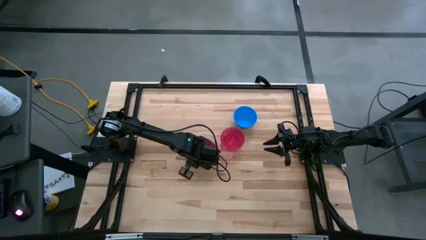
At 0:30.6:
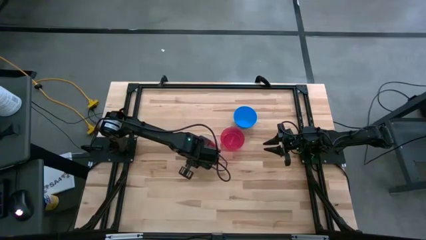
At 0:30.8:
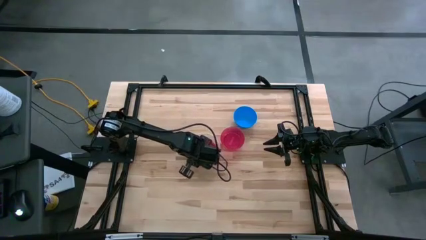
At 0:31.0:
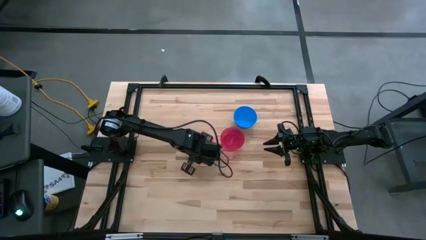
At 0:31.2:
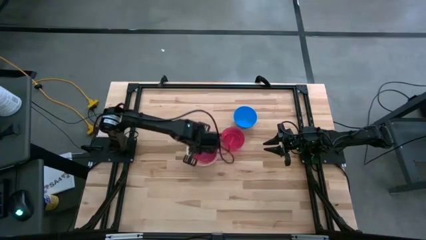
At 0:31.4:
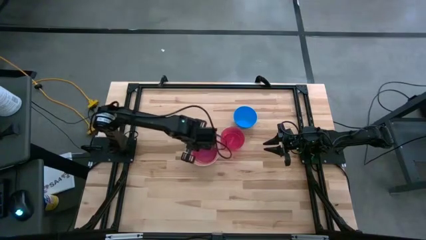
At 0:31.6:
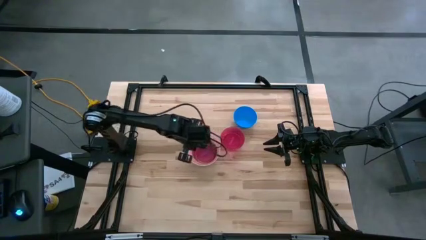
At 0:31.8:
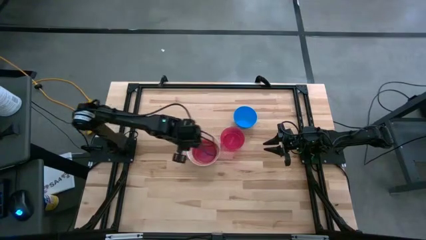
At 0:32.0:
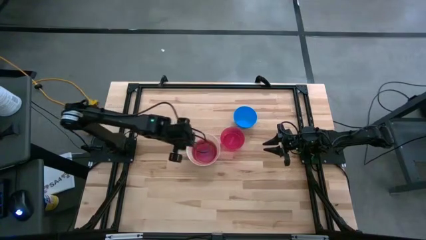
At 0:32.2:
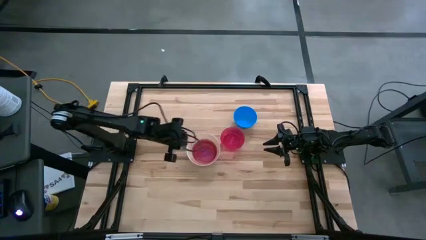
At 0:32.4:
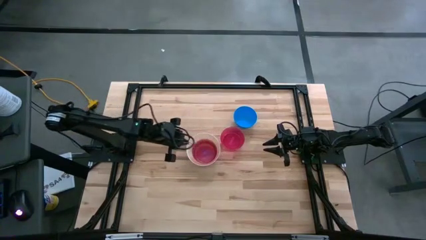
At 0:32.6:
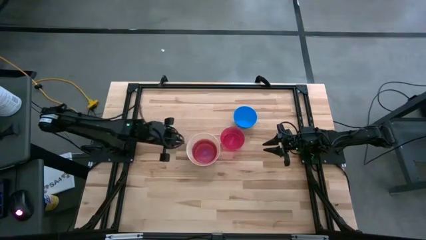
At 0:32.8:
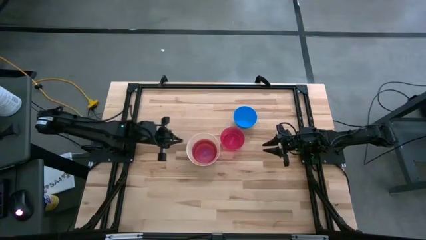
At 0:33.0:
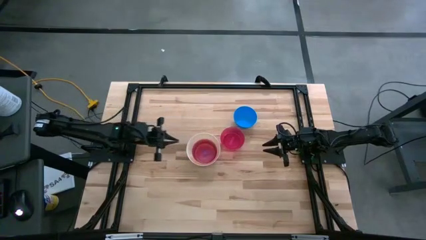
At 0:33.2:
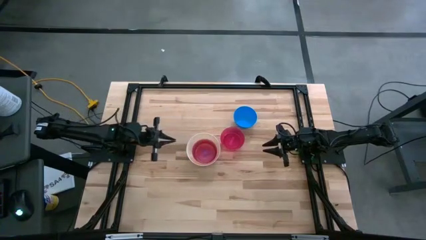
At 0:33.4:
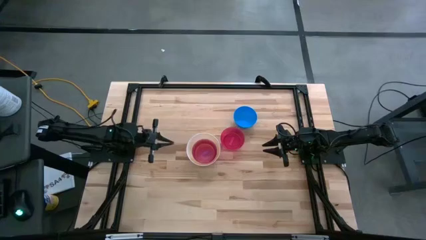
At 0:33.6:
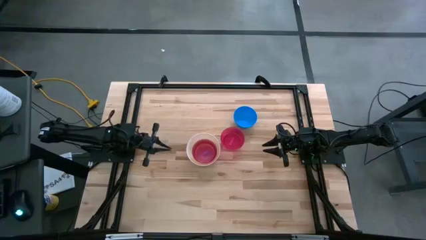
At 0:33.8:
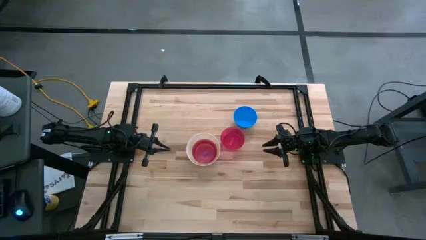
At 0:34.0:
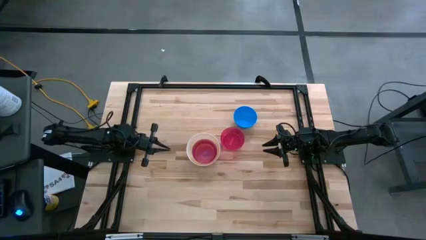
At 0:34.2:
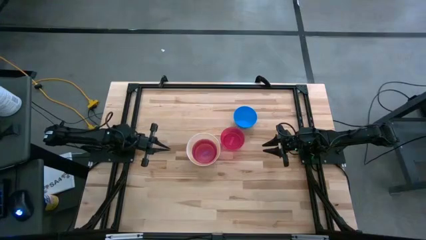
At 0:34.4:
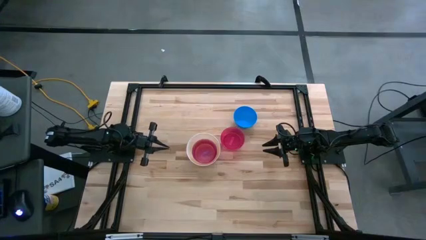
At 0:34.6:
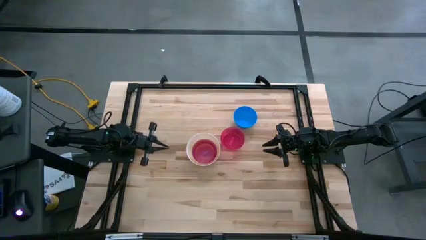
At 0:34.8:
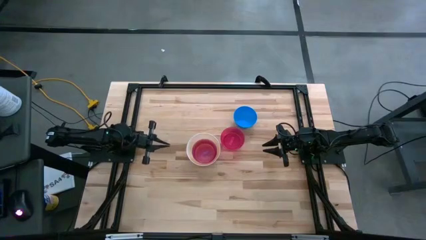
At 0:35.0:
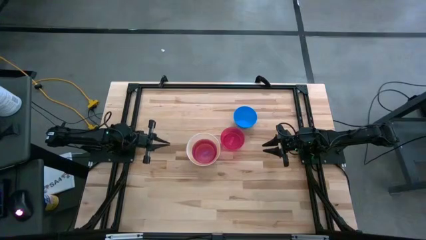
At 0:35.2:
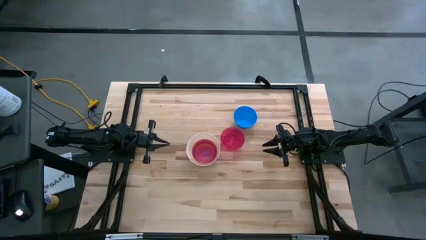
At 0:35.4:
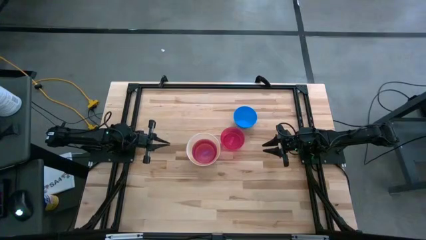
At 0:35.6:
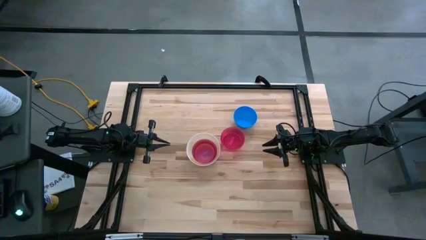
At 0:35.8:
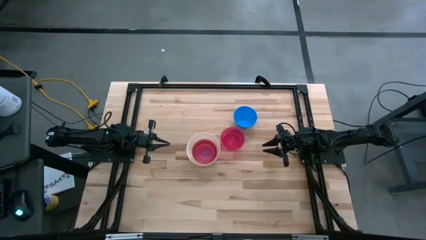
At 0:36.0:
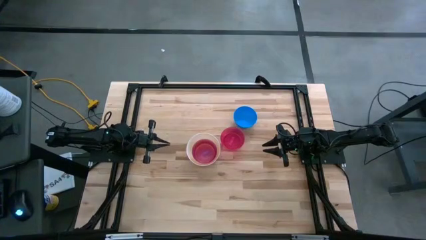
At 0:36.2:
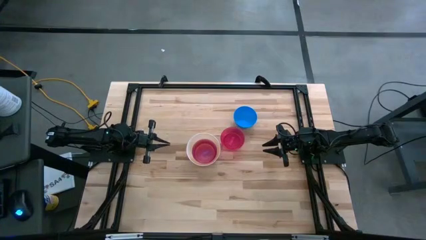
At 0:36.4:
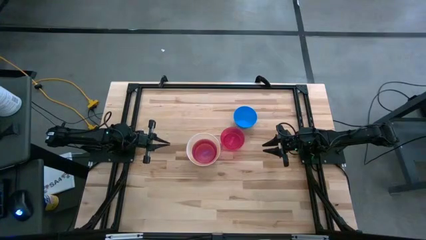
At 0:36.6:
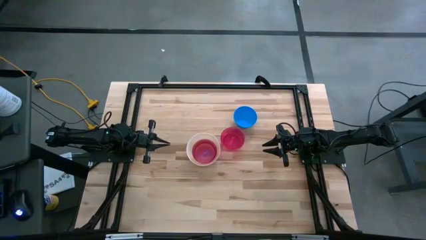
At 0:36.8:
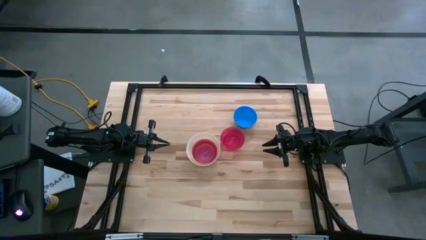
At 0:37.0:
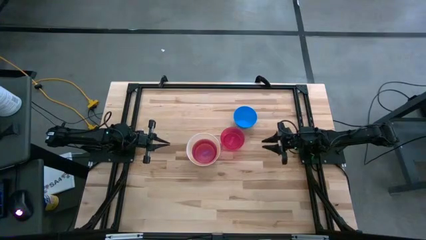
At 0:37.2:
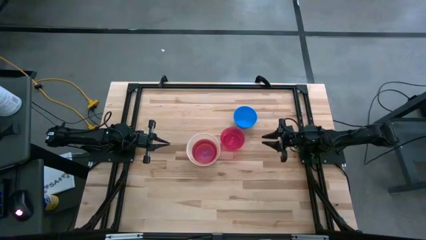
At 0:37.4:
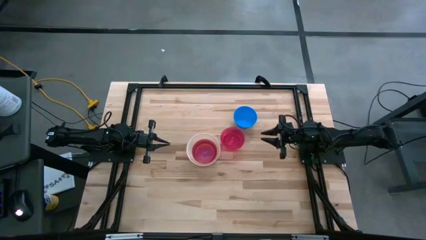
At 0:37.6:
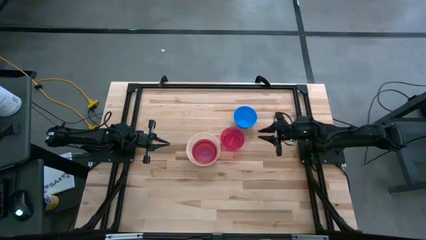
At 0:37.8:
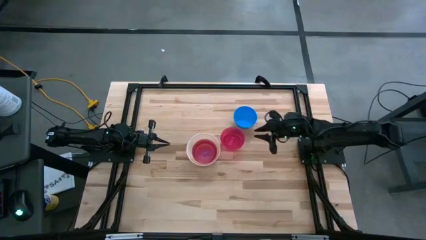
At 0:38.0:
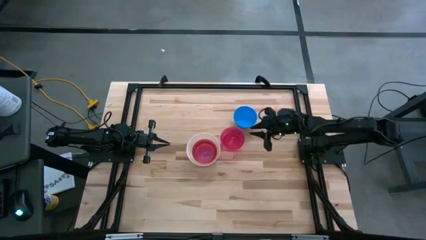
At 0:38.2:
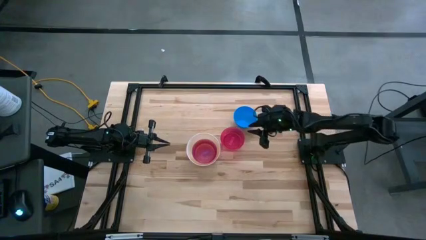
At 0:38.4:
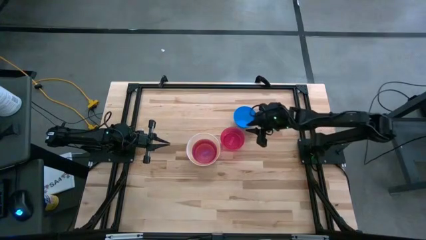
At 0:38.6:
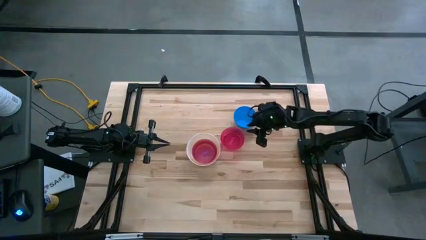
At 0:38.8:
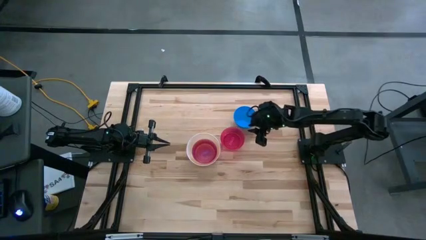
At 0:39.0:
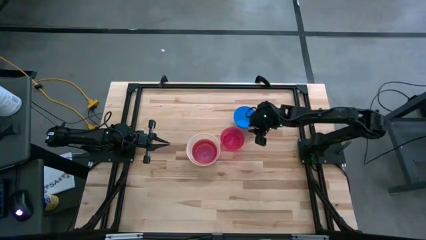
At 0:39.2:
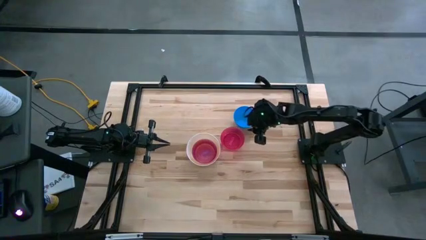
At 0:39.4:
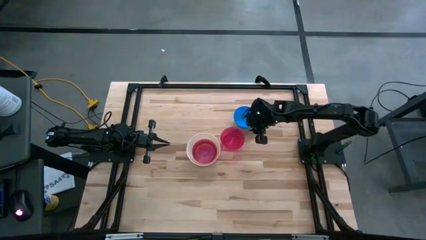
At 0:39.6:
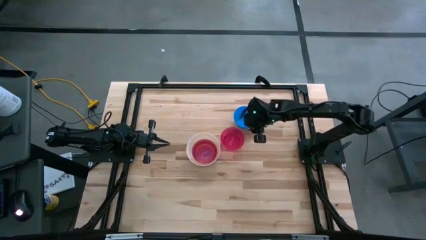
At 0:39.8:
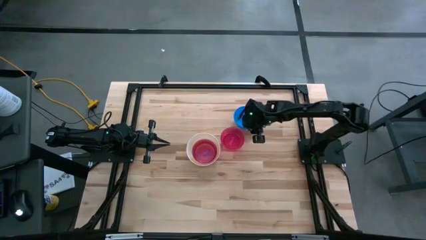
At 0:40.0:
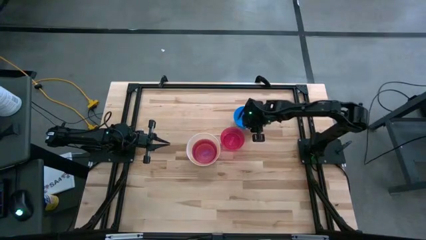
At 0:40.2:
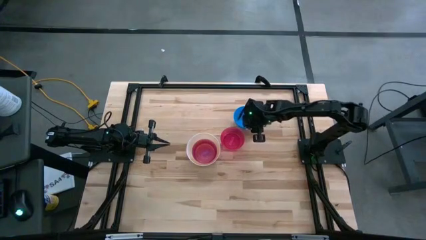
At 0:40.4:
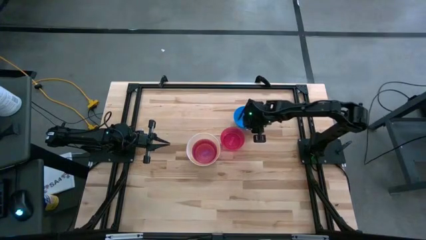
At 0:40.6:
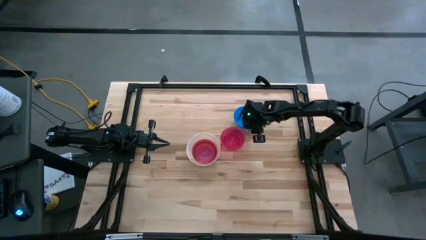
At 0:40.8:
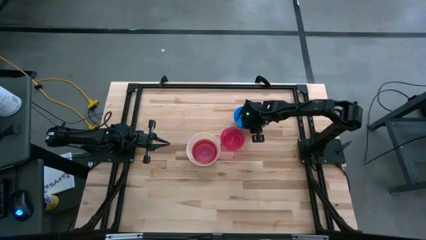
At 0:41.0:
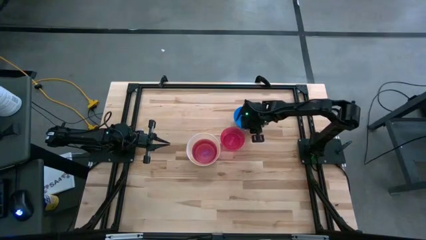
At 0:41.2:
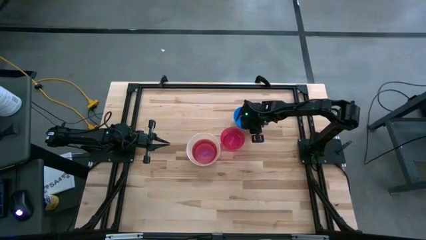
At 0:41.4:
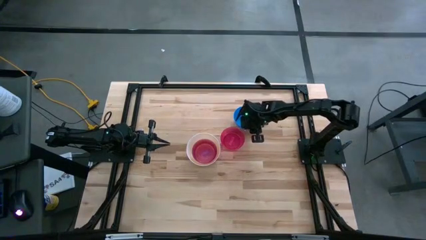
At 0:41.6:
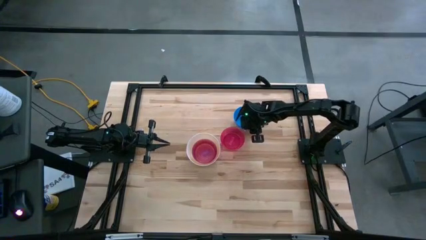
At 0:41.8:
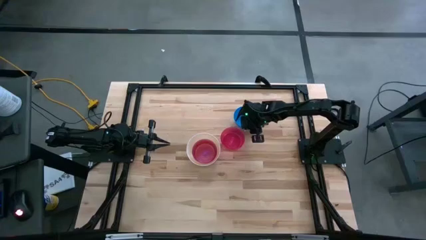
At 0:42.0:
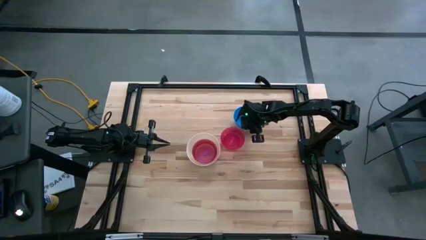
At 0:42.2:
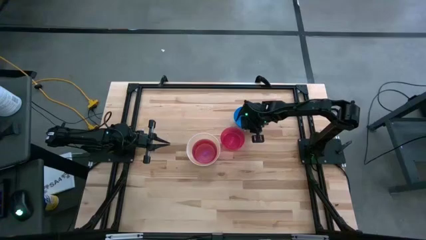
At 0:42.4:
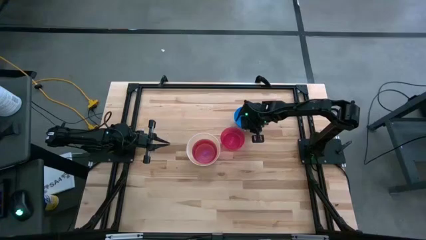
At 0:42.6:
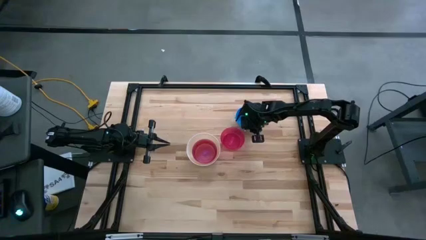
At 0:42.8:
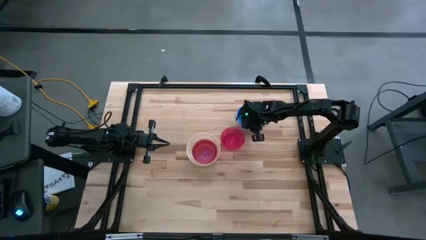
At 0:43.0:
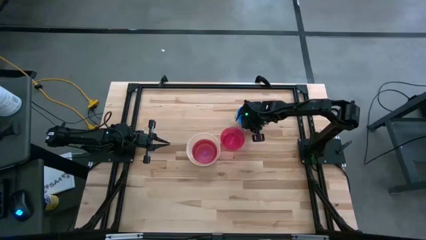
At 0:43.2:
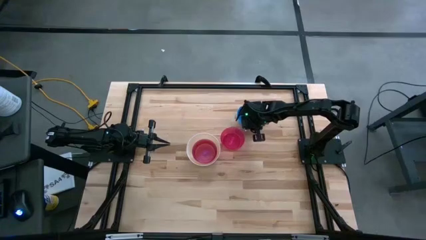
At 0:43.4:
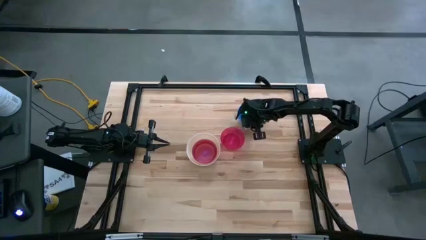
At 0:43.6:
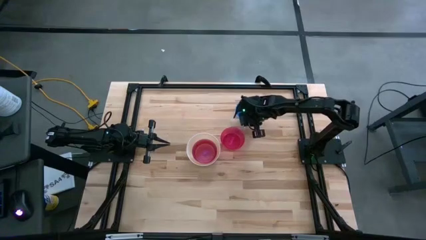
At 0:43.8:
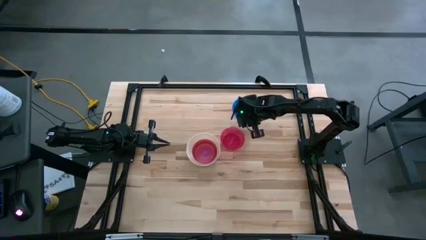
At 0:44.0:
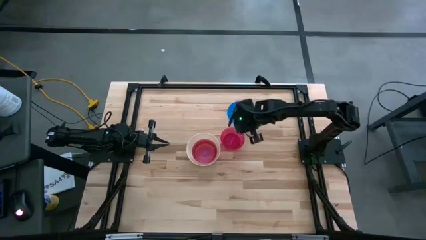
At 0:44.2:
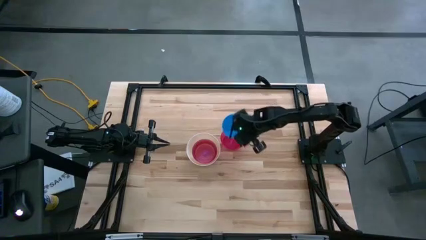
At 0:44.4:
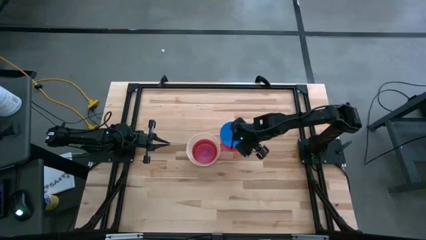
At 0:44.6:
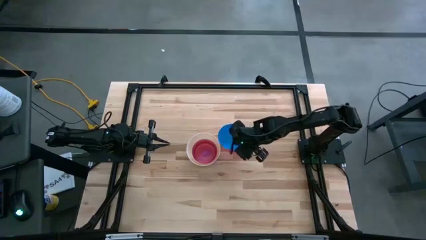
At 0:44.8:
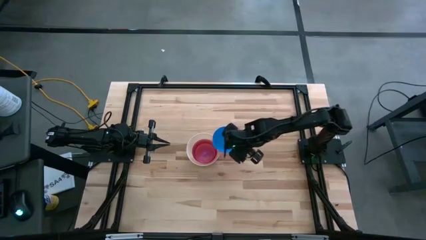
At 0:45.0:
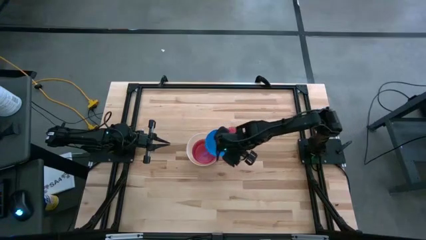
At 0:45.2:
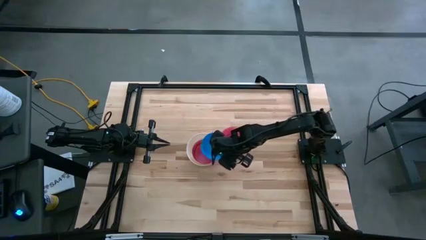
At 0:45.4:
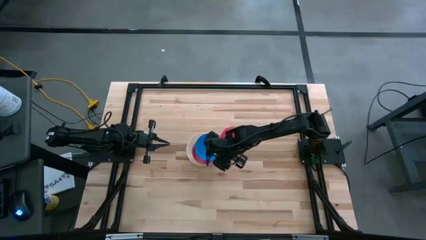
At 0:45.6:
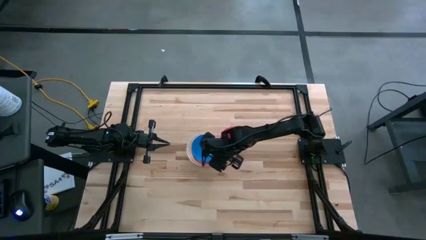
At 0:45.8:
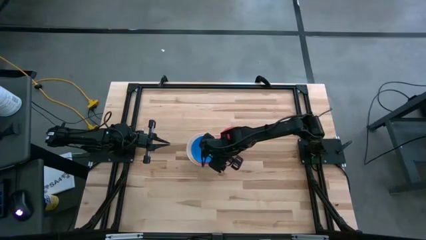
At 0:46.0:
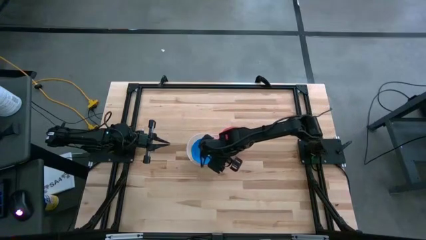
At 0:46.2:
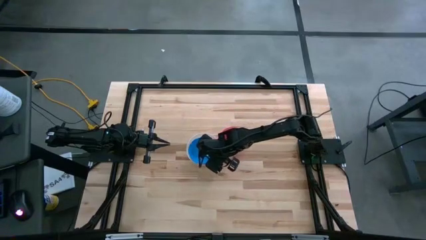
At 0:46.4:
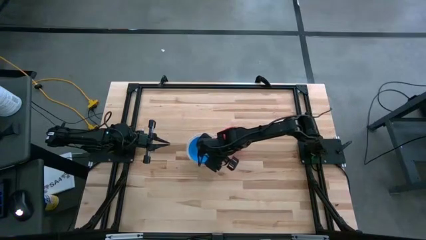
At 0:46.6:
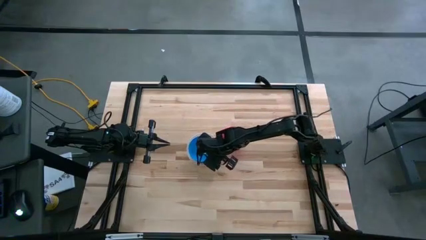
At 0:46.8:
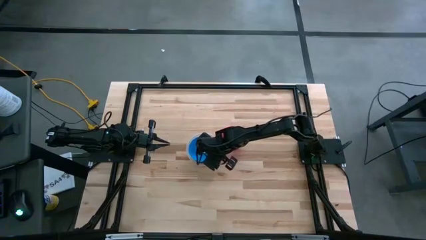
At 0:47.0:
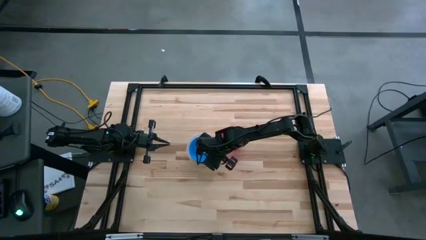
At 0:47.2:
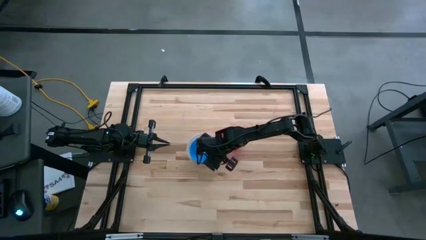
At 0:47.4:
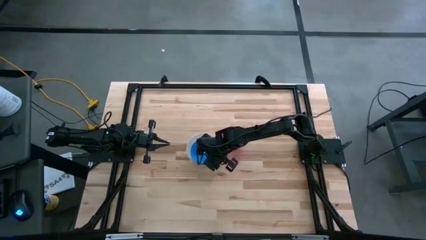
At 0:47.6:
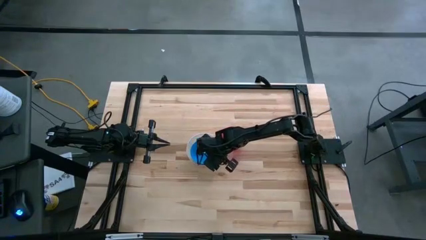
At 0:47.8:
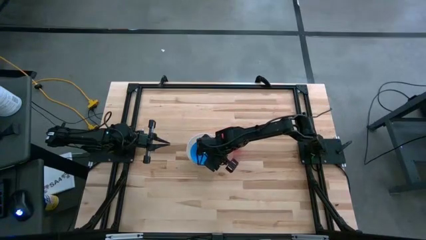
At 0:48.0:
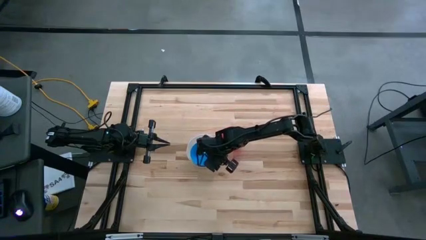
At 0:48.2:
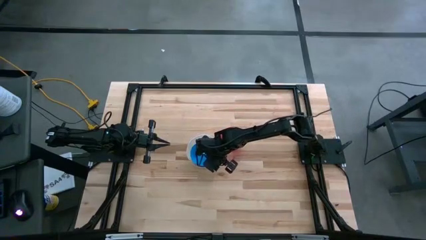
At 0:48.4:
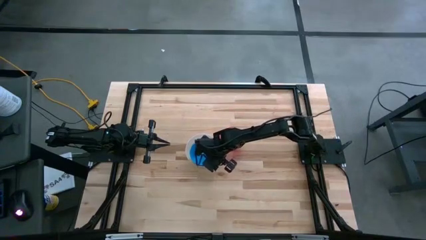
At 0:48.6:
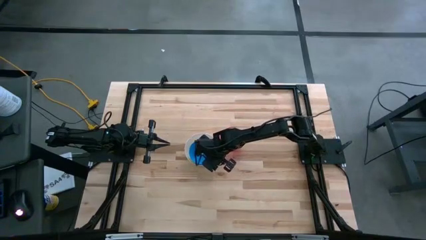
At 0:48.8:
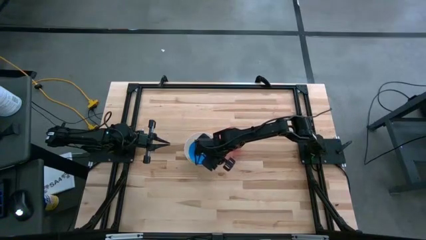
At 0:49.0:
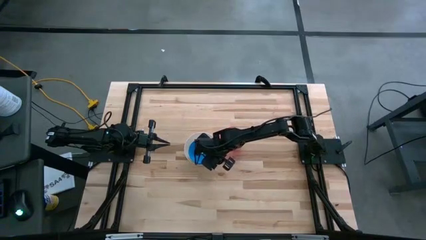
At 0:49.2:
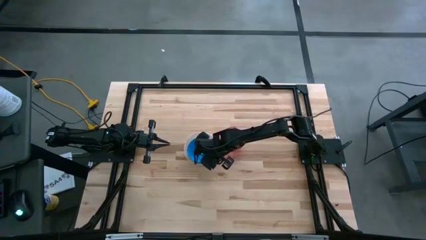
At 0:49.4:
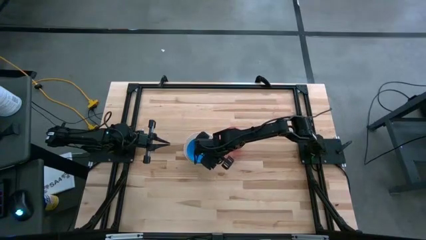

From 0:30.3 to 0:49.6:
Stack the blue bowl on top of the purple bowl
